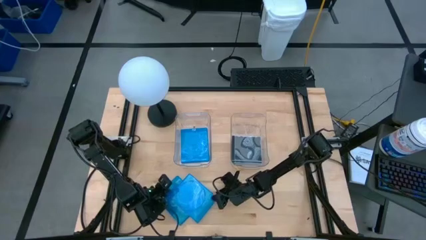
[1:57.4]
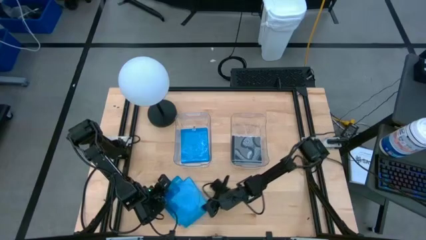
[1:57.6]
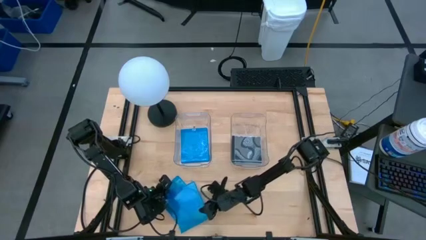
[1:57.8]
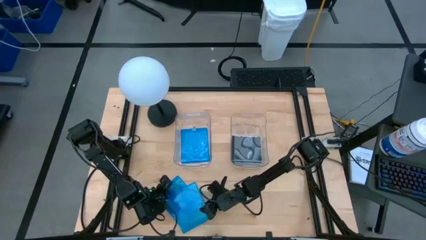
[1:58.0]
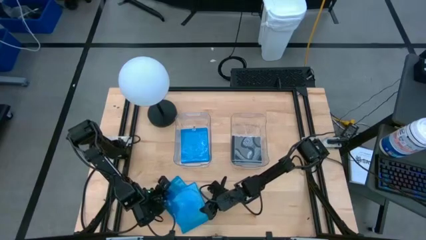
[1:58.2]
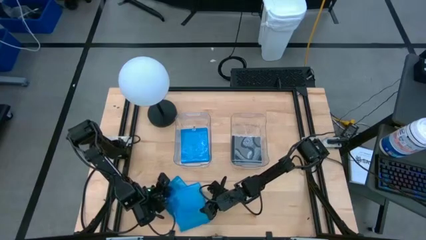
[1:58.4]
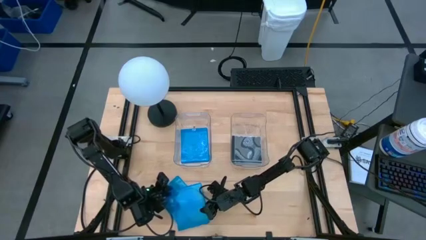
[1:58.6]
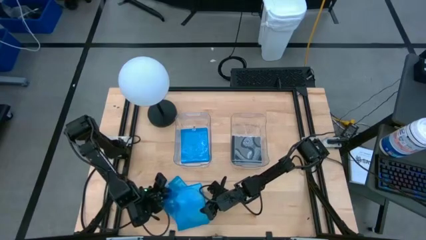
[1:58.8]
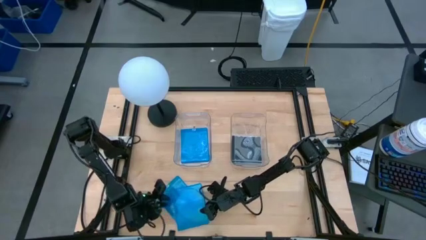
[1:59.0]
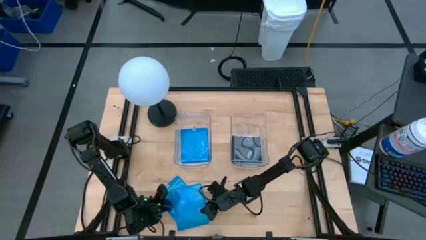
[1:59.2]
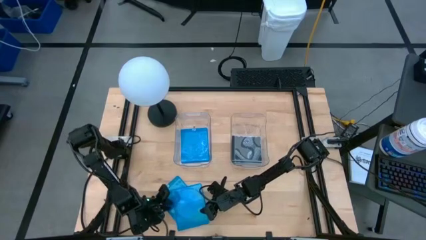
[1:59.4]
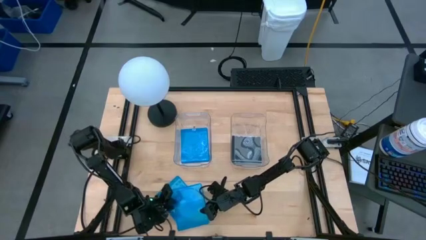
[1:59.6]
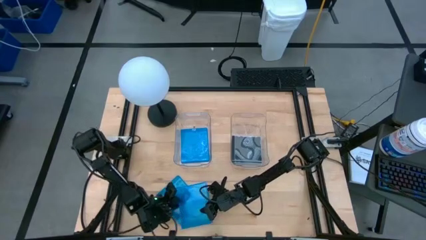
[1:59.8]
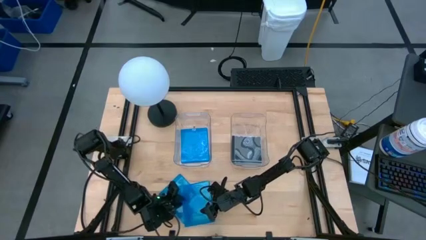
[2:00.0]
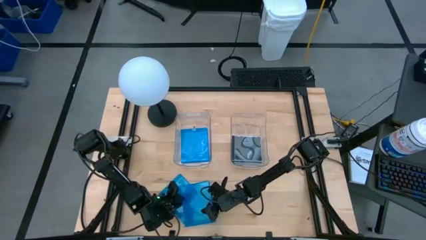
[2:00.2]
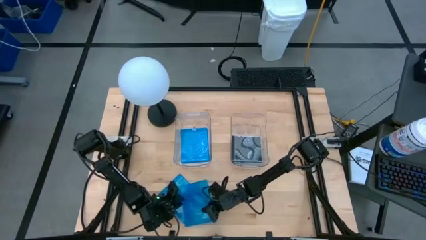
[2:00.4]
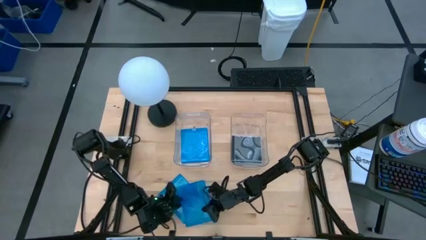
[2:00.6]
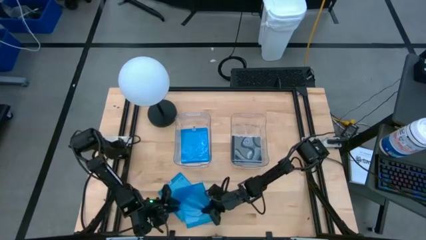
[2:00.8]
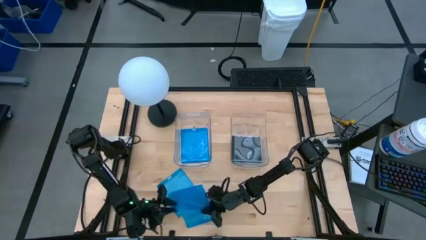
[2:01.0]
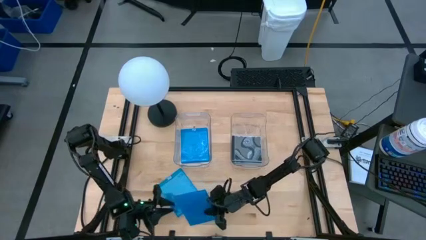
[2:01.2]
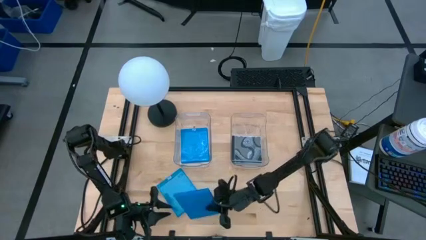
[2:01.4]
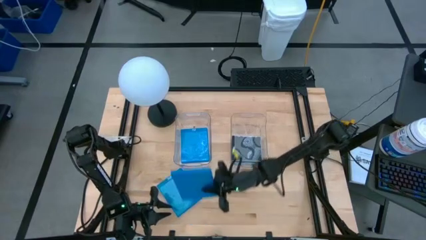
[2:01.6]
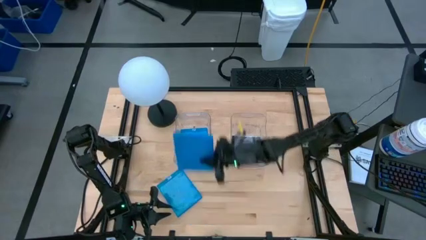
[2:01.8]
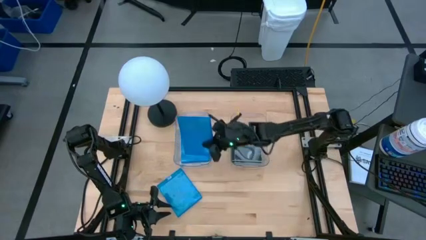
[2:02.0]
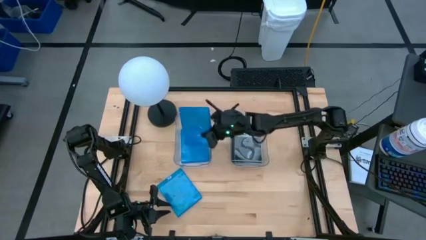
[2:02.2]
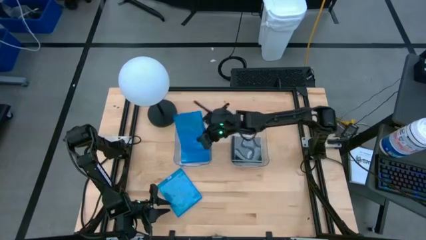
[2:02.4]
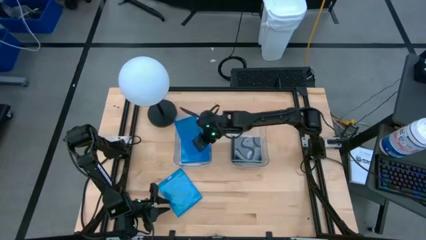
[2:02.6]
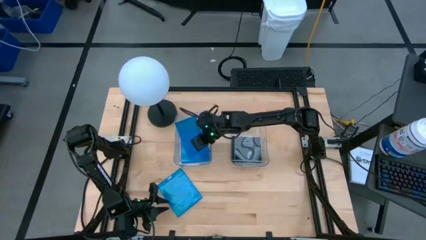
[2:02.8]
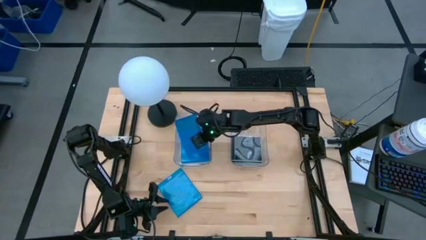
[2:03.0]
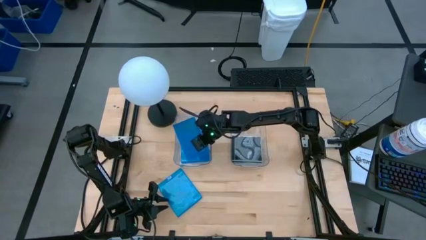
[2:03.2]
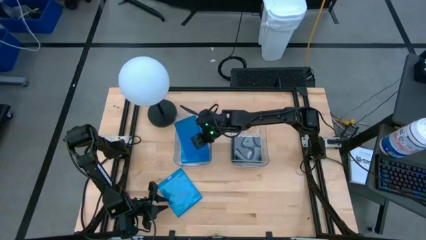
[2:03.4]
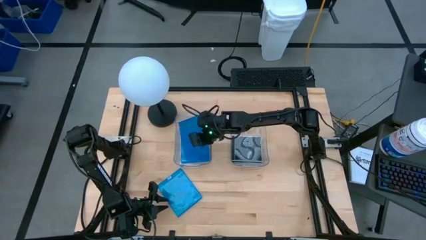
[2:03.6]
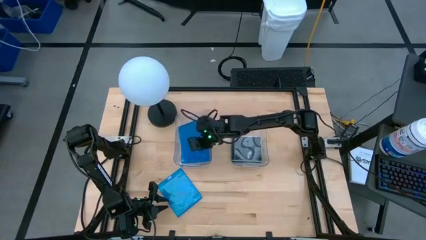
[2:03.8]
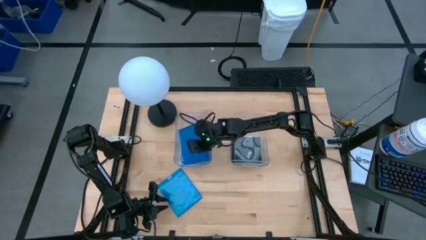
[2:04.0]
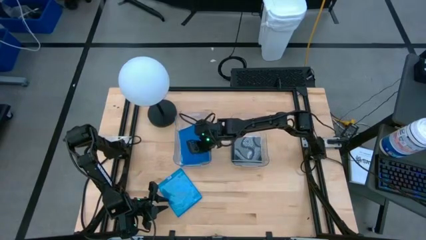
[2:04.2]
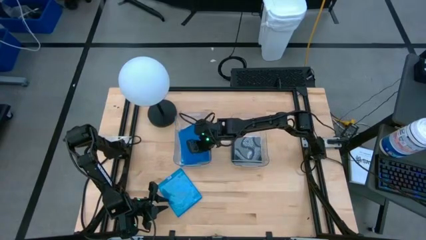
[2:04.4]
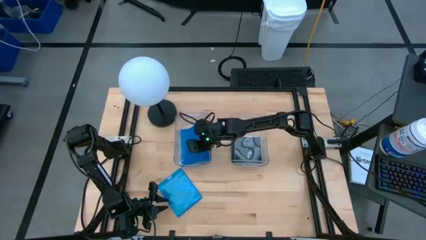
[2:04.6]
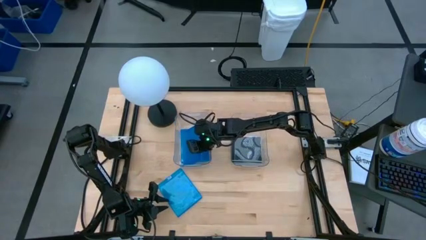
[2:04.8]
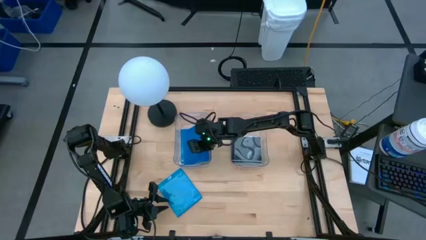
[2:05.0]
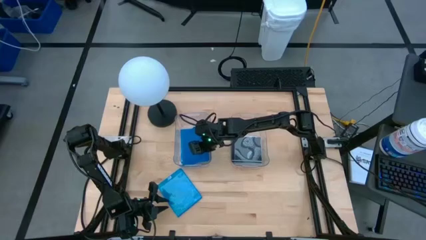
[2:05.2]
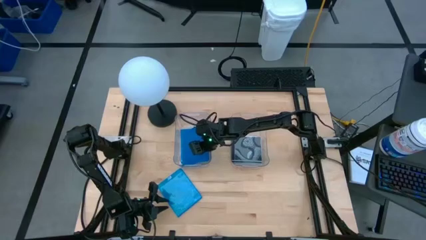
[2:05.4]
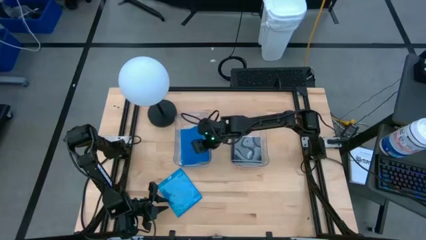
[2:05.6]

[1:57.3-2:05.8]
Task: Pick & place jewel cases by type
Put the blue CD case into the left transparent bin

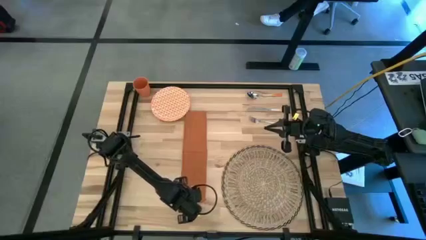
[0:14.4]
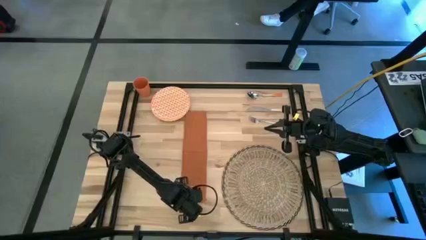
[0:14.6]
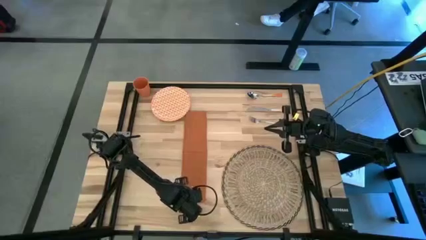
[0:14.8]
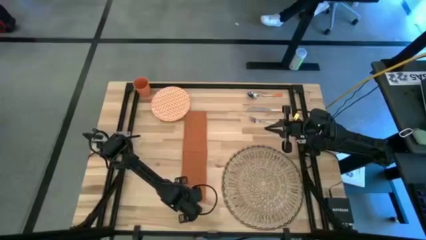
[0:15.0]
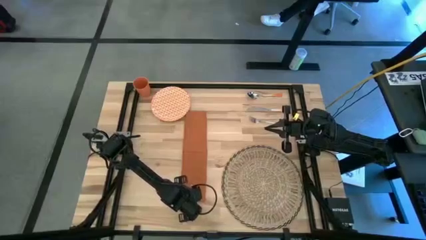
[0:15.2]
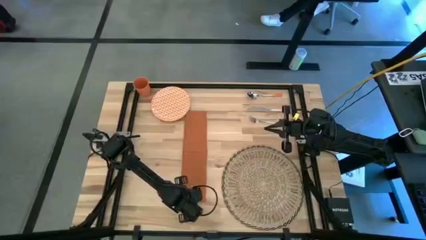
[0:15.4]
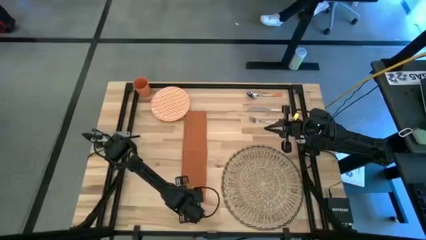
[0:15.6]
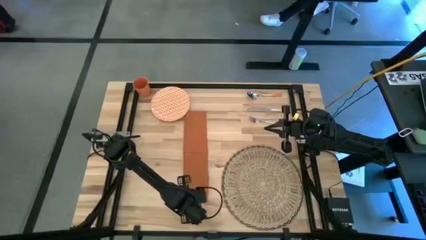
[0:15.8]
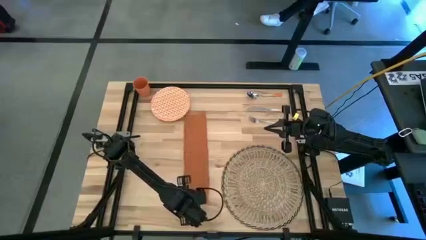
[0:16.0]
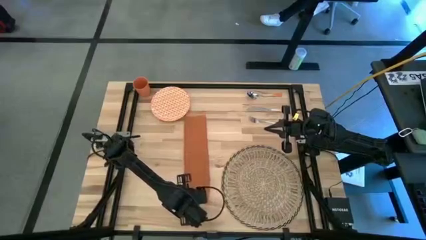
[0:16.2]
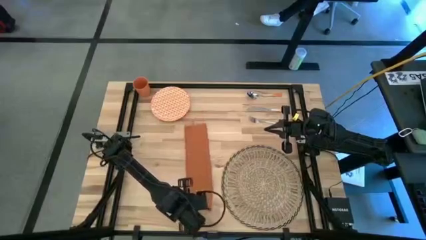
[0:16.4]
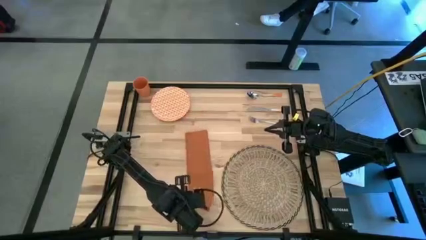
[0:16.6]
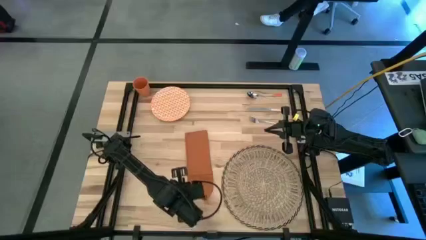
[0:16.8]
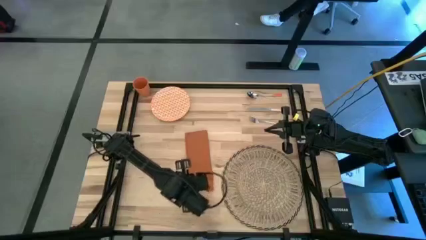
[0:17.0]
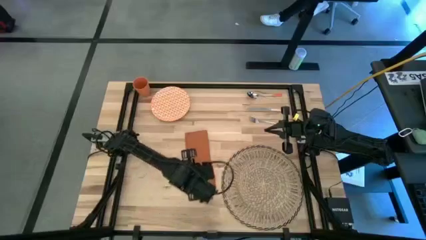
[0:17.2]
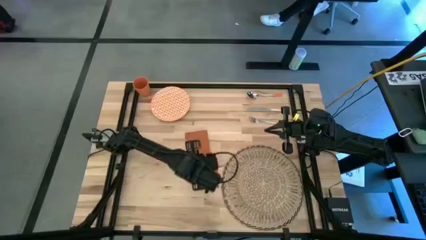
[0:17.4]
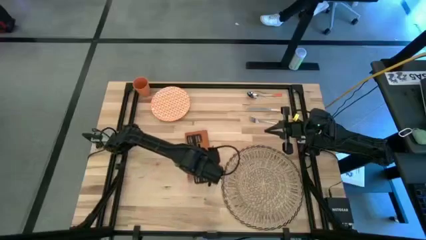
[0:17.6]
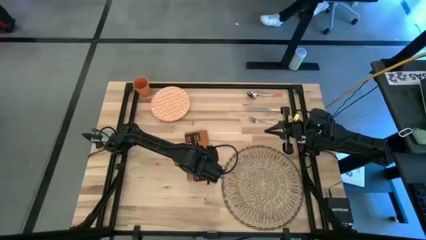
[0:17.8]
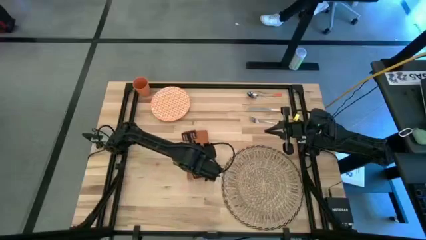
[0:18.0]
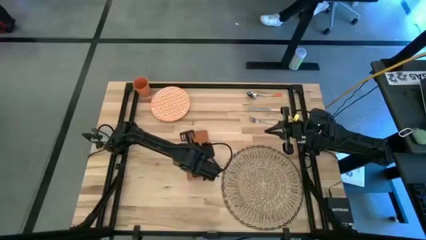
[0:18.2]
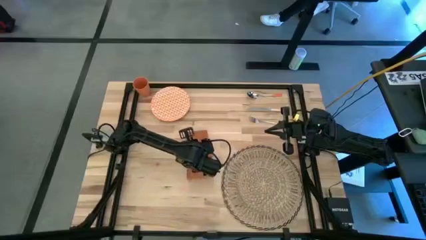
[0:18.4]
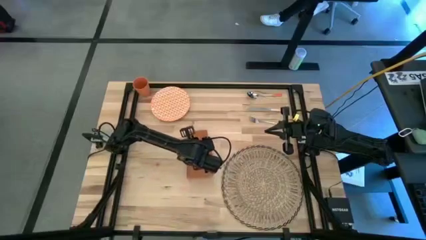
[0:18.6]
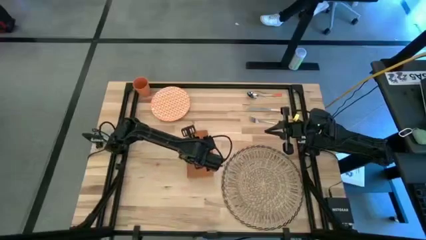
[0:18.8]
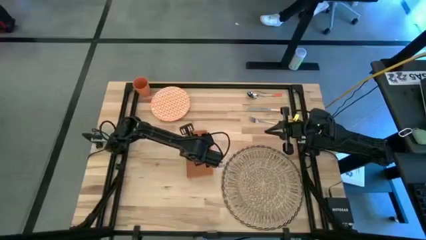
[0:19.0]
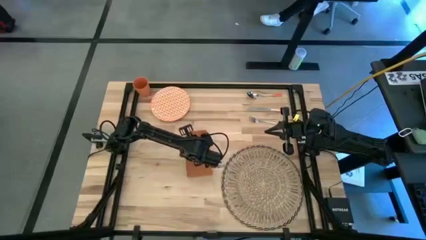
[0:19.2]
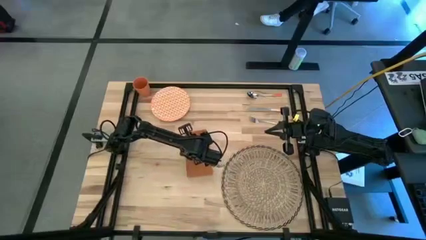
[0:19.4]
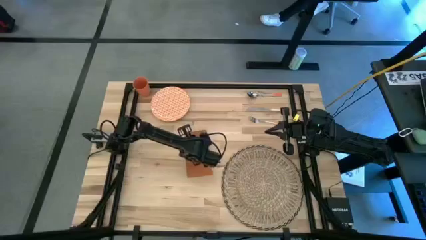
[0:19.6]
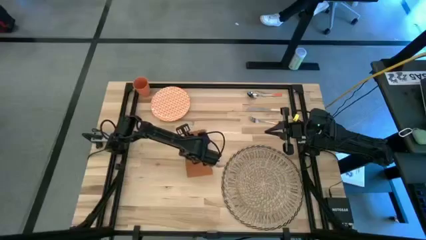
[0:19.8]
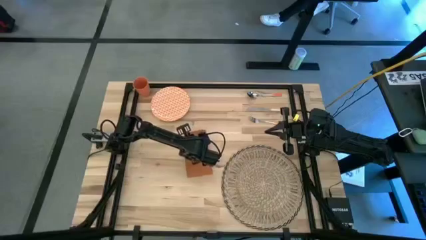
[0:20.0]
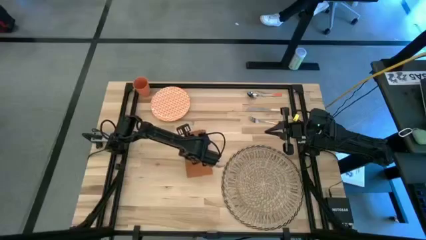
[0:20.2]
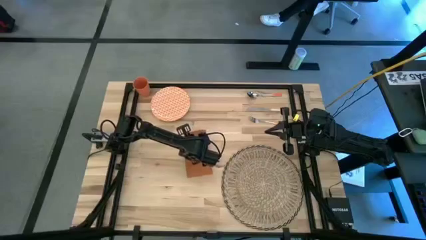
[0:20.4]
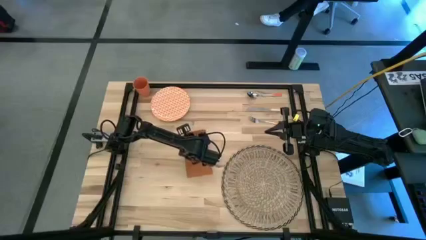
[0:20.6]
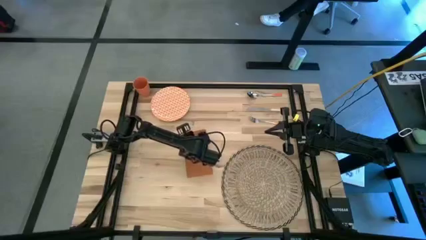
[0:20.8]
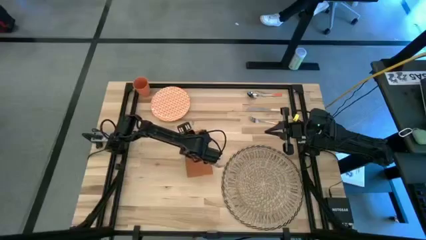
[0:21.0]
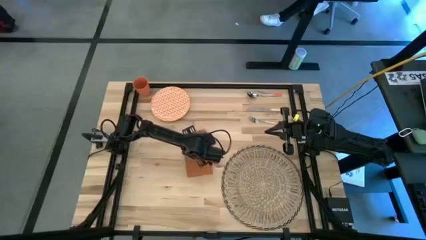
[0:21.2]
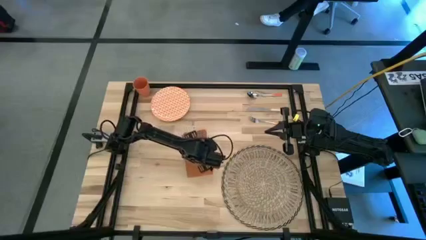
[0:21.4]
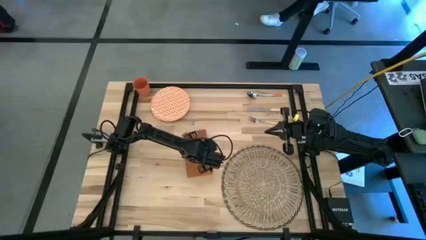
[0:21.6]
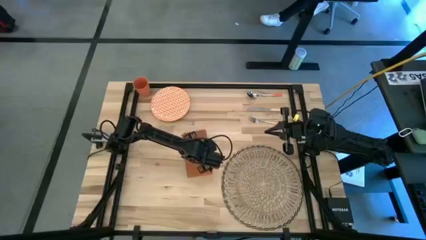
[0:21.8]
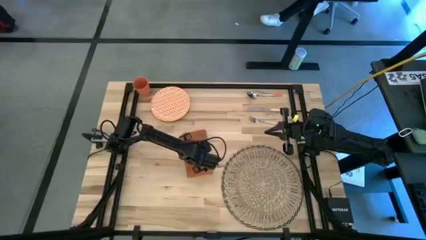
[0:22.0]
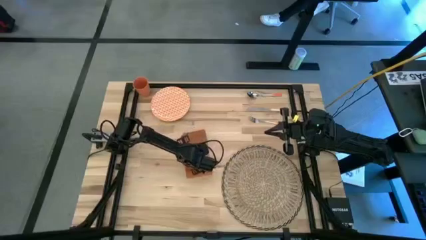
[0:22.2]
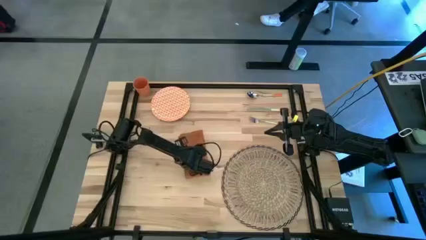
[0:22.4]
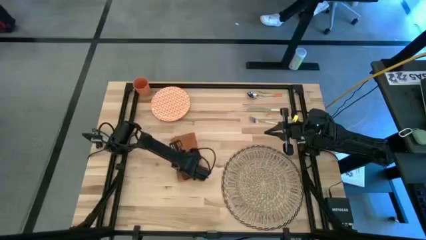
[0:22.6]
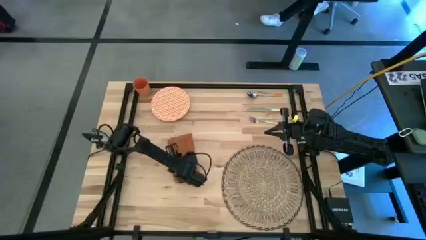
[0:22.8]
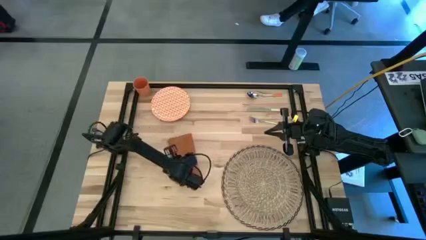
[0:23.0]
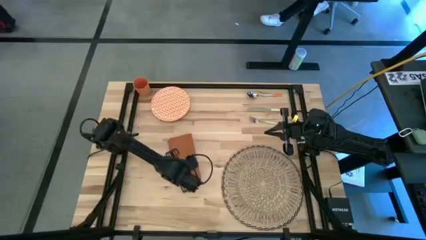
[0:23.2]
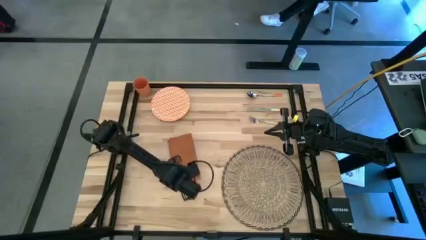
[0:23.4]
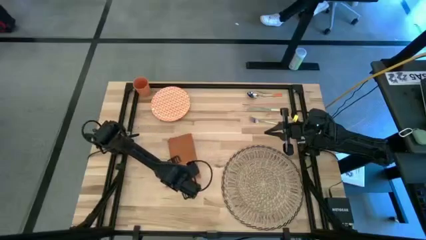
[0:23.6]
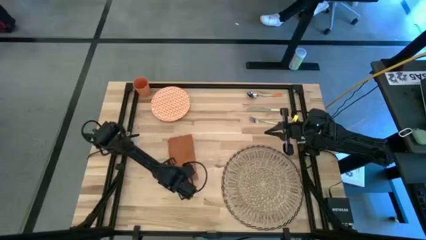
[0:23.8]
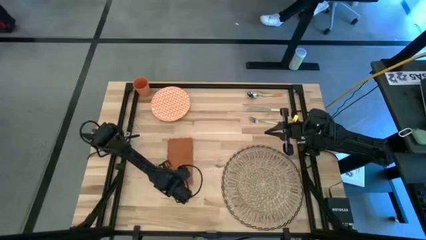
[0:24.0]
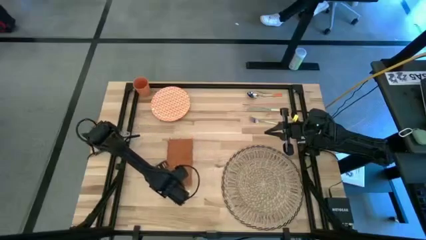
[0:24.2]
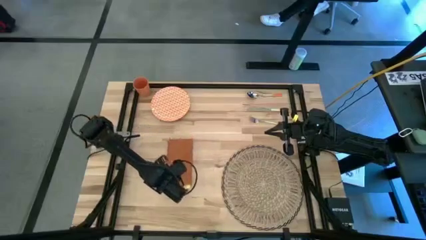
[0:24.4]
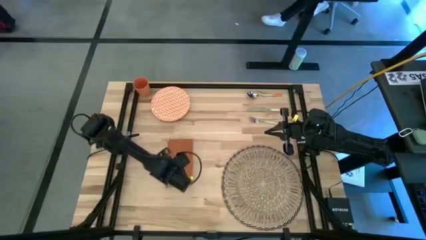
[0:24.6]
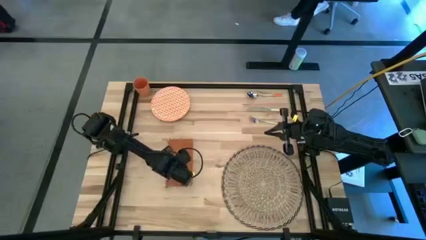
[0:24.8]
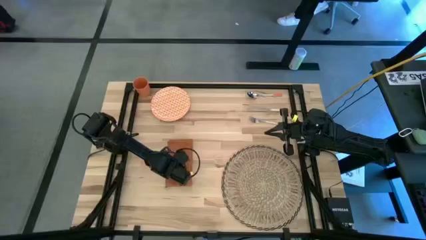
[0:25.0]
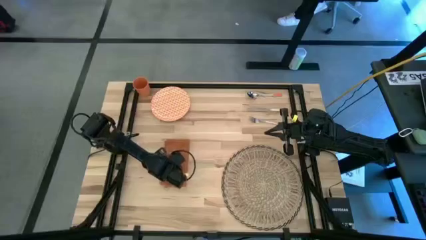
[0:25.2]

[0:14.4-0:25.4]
Task: Set table place
Fold the orange table napkin
